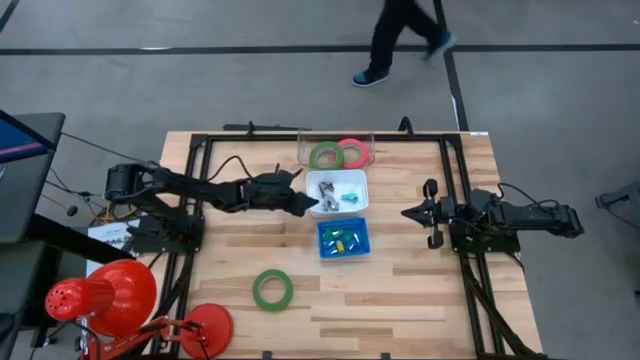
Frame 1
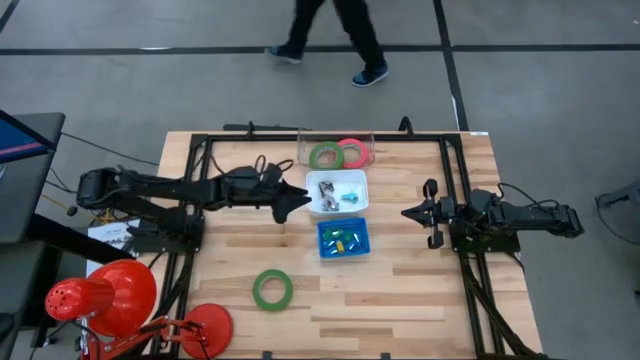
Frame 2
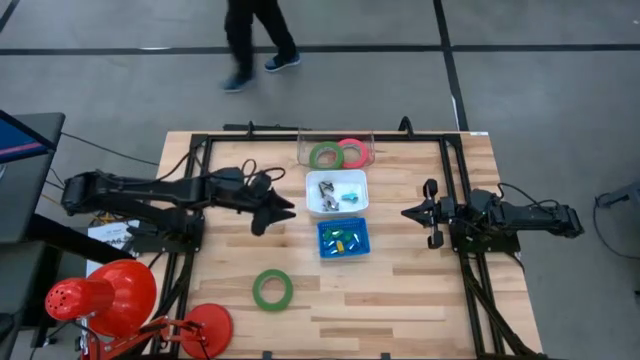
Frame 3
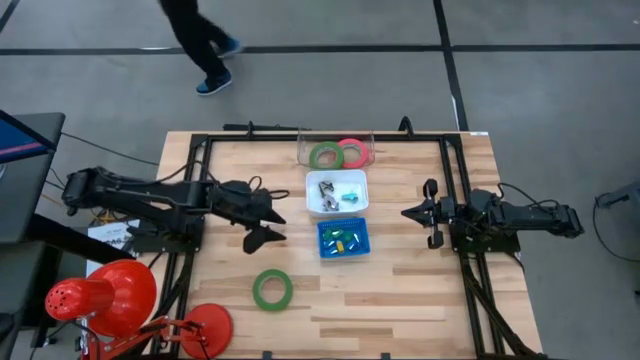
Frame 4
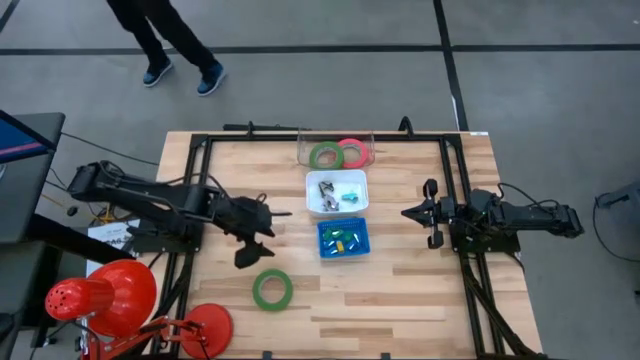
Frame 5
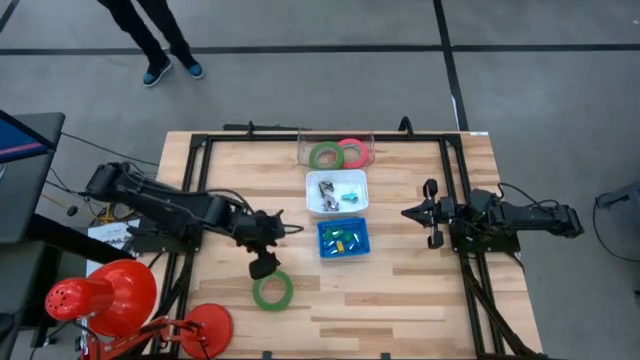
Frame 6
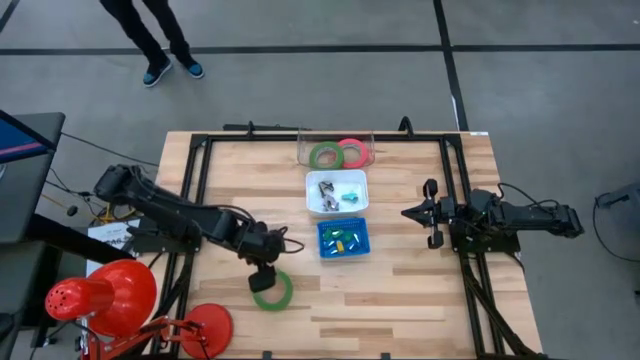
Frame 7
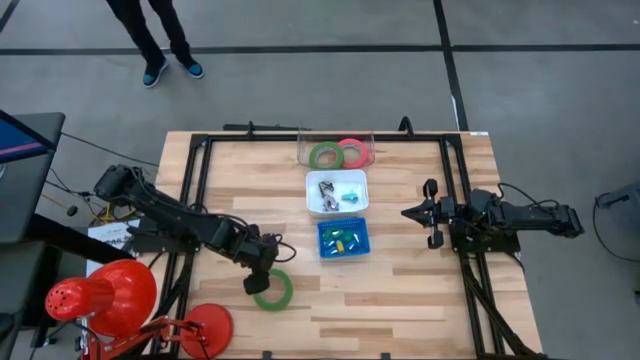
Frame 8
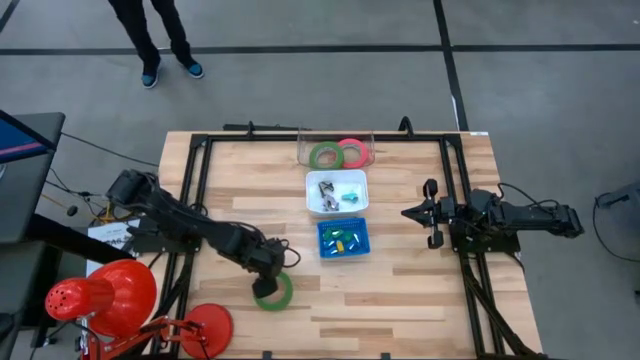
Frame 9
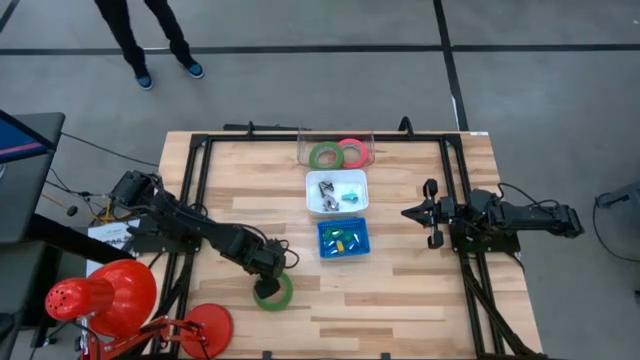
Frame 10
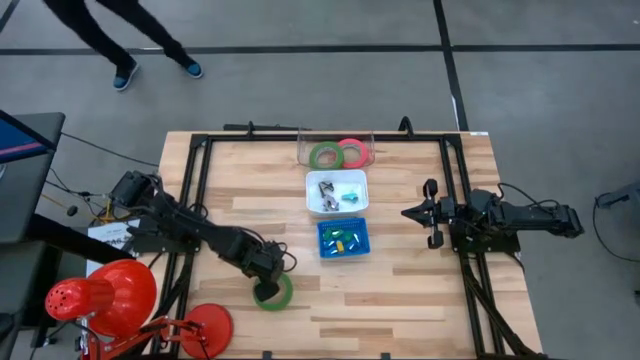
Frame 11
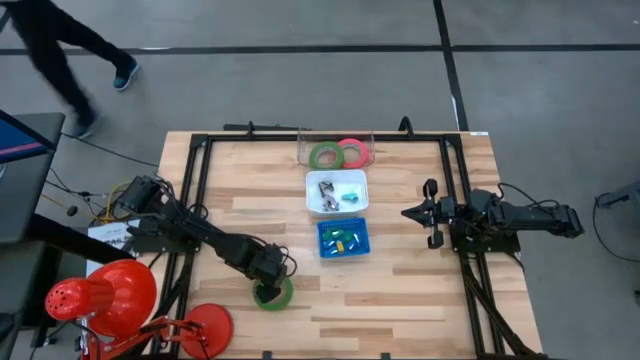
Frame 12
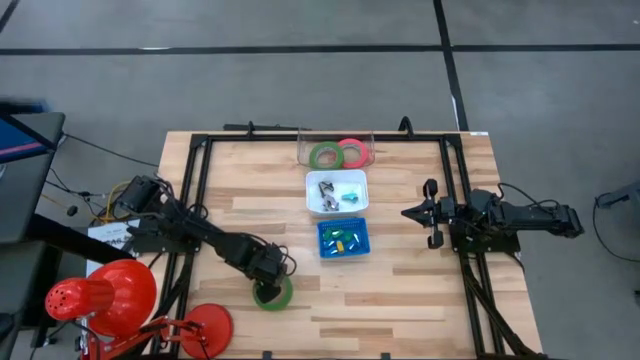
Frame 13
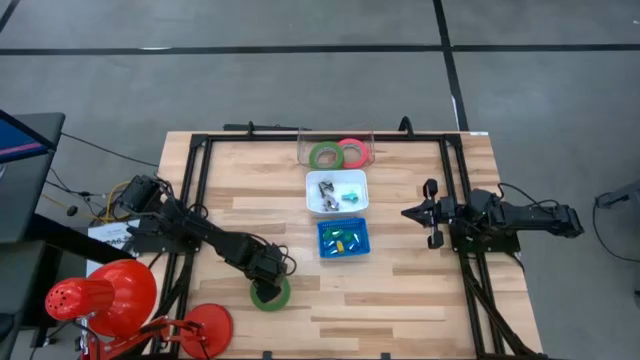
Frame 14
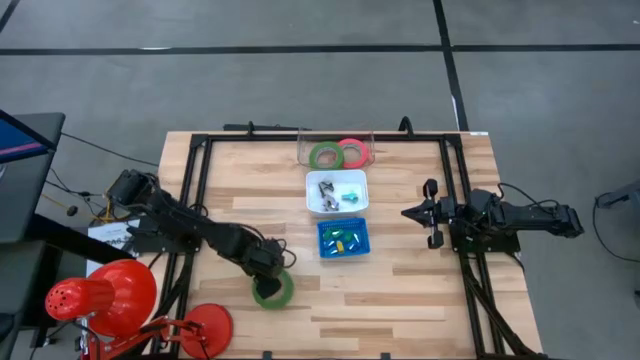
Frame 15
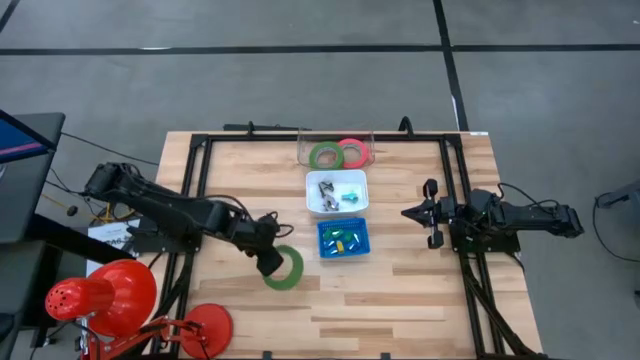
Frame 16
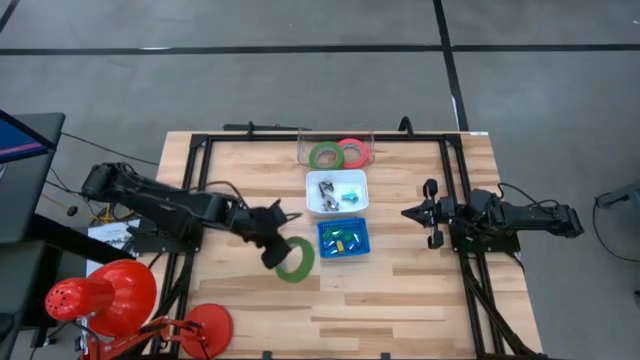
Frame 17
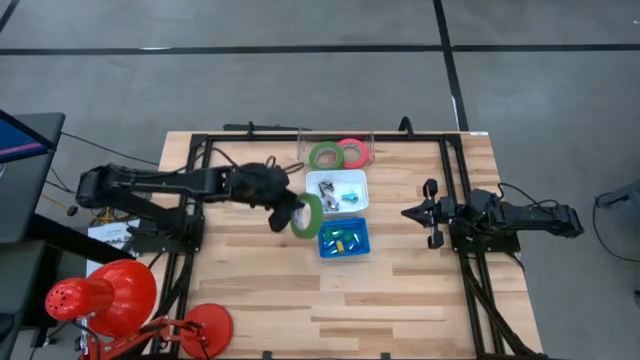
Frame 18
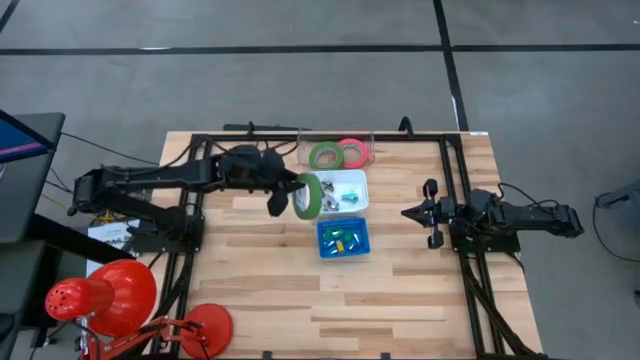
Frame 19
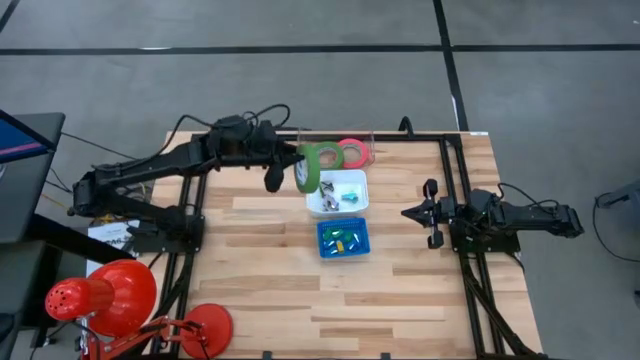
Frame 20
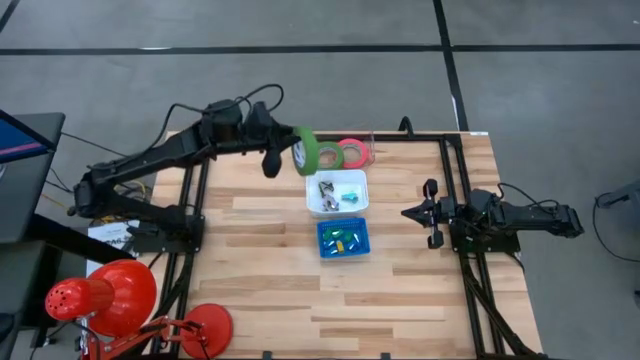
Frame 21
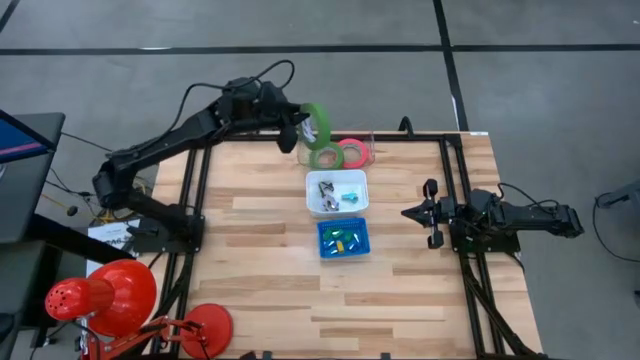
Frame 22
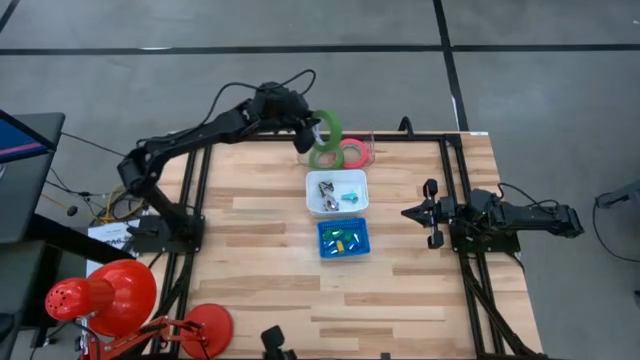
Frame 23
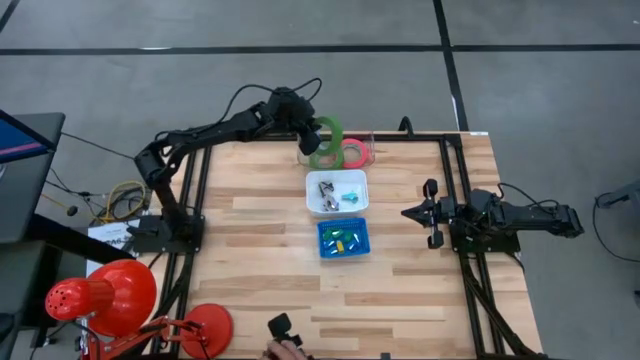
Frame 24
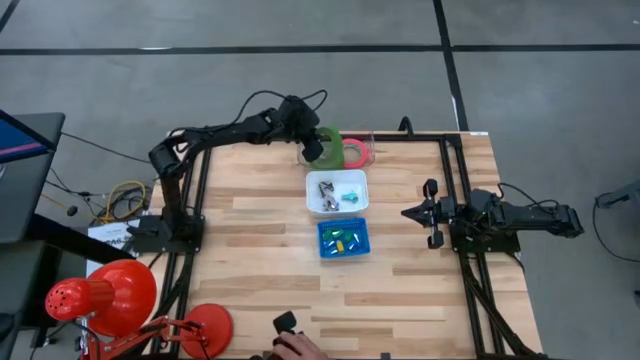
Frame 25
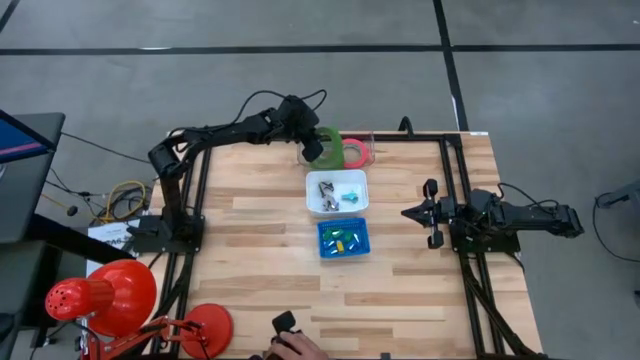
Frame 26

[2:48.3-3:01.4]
Task: Pick and place Stapler, Stapler remover, tape
Put the green tape into the transparent bin

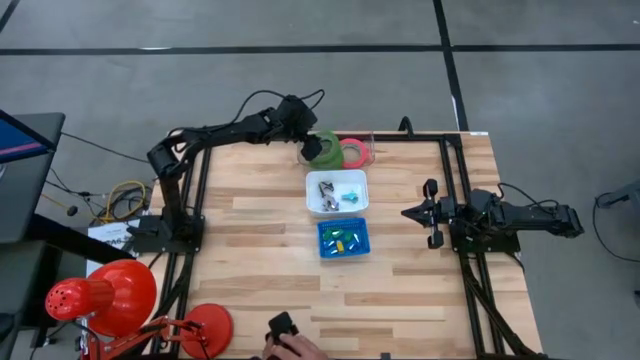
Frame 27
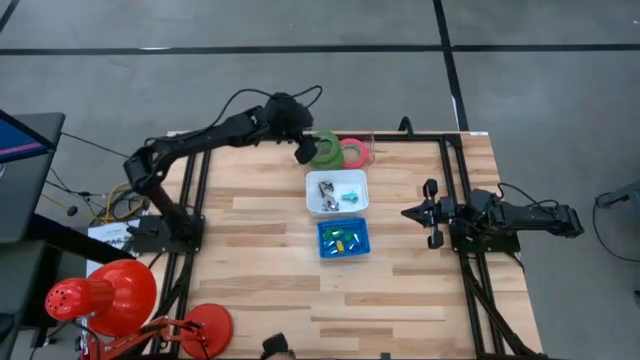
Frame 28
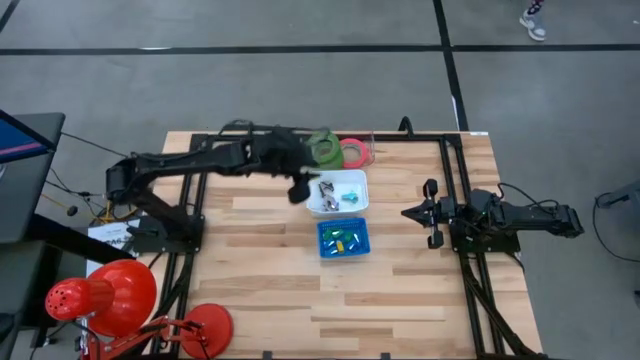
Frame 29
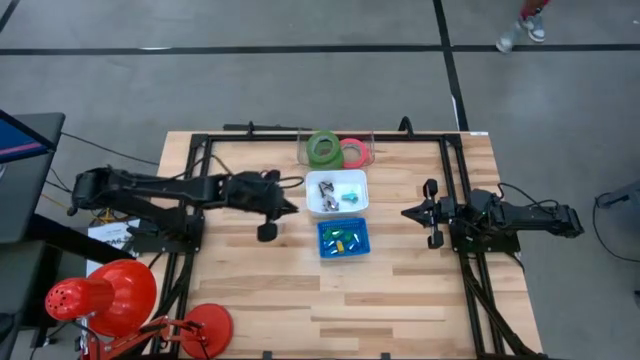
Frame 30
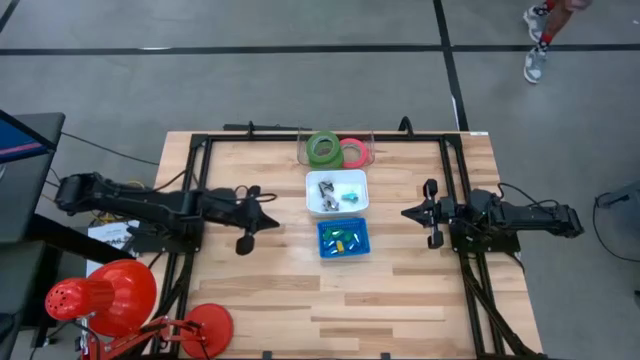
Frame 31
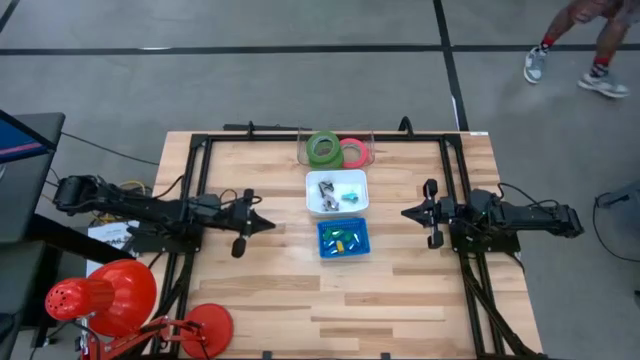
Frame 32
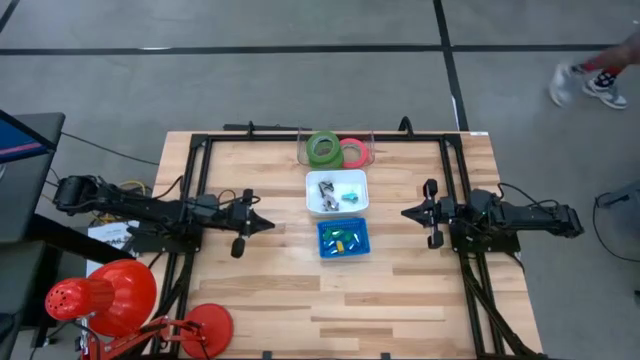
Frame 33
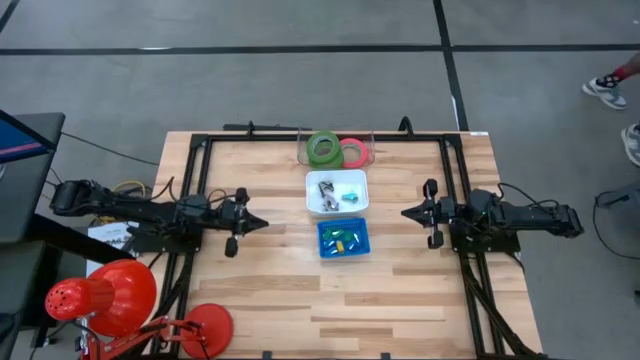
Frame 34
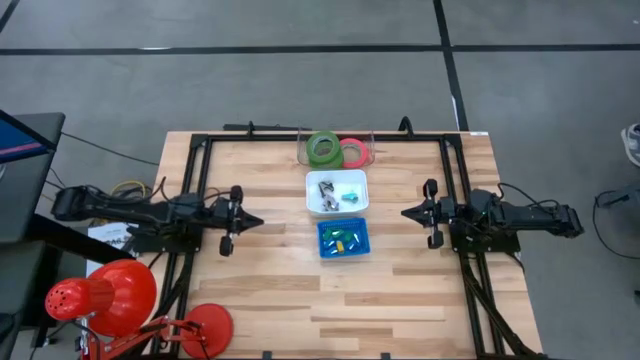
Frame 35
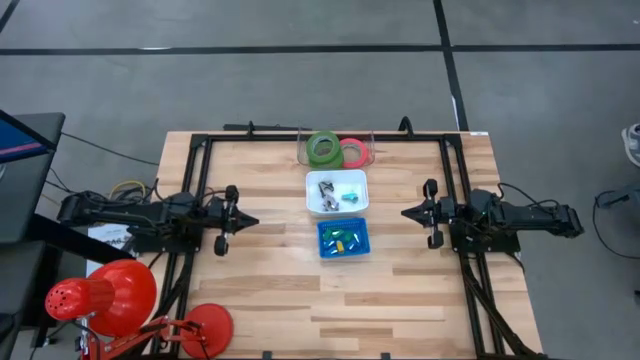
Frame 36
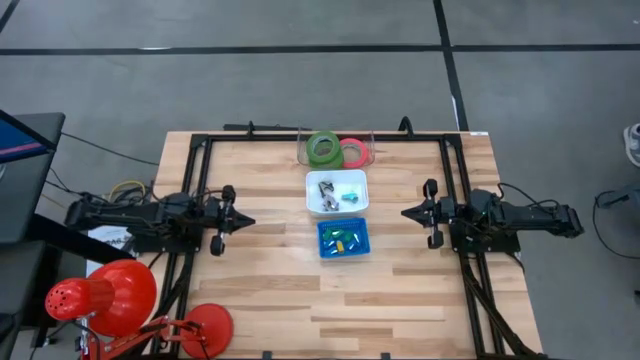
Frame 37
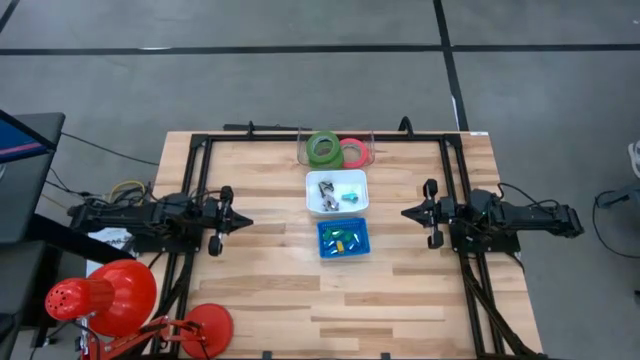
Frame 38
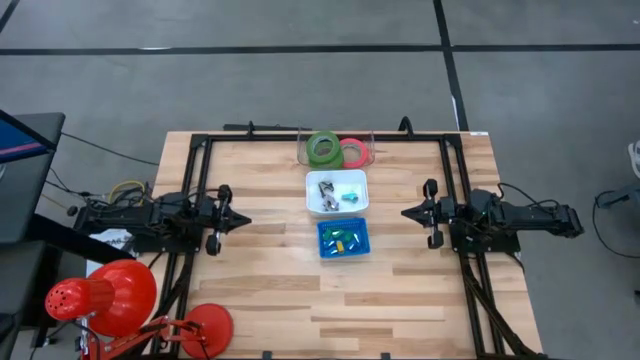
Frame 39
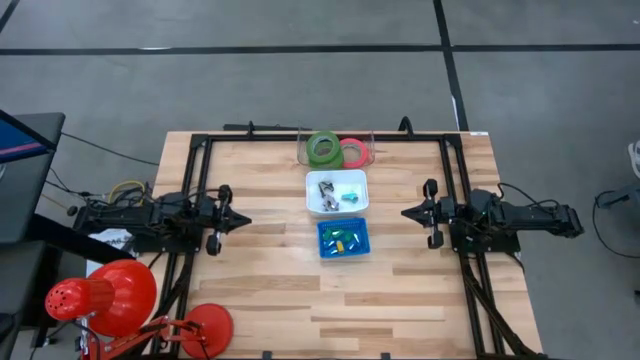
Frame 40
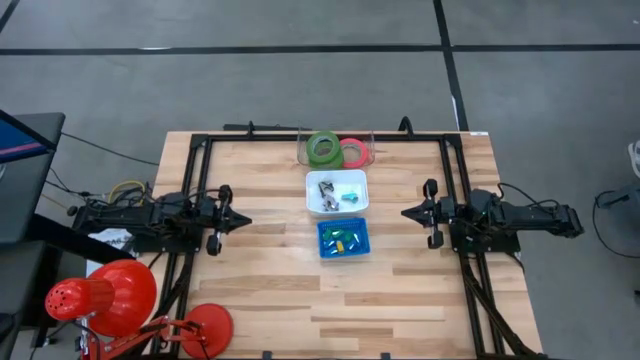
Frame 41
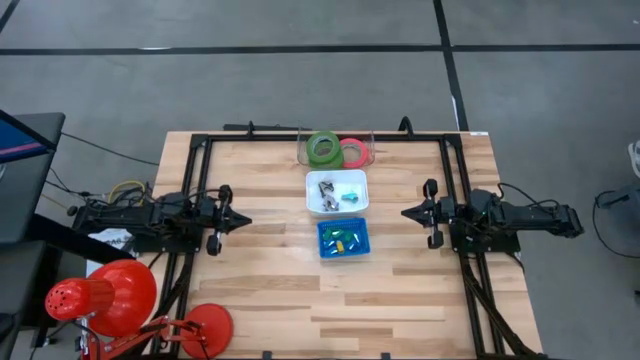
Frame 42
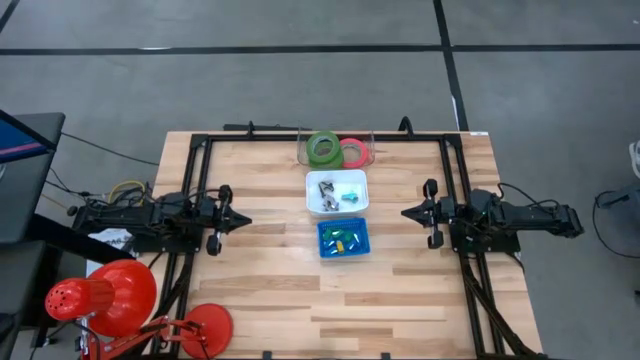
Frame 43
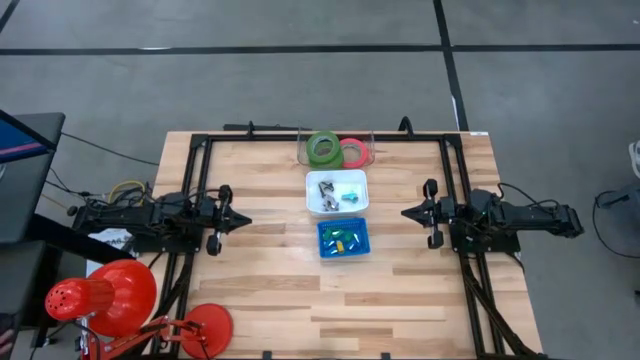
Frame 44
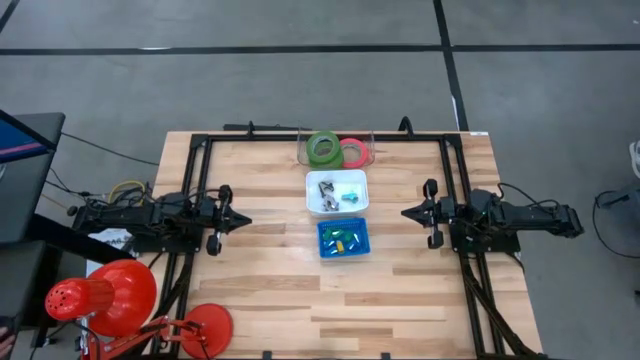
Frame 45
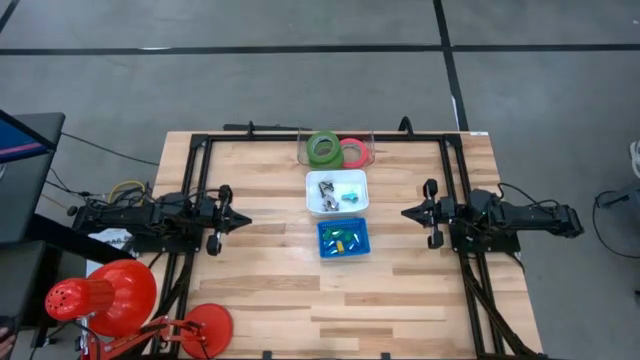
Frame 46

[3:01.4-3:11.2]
Return to Home Position
